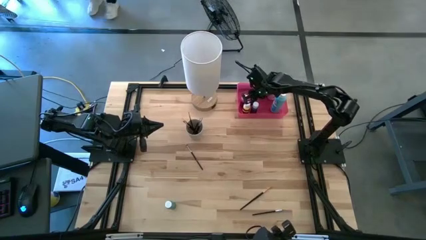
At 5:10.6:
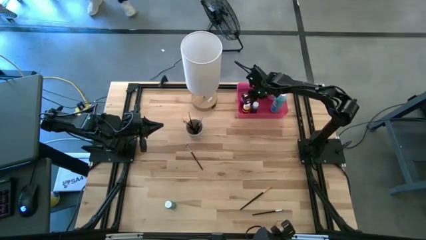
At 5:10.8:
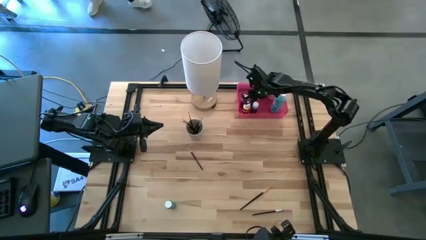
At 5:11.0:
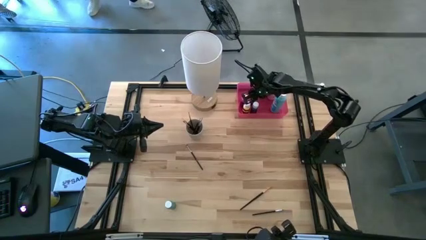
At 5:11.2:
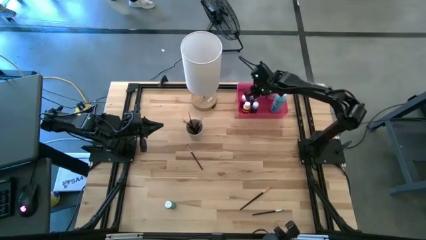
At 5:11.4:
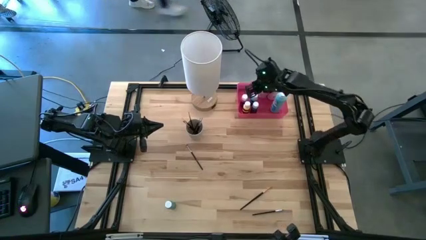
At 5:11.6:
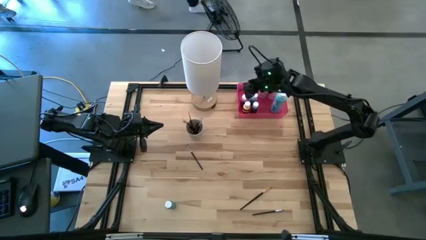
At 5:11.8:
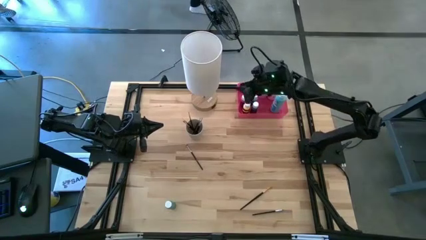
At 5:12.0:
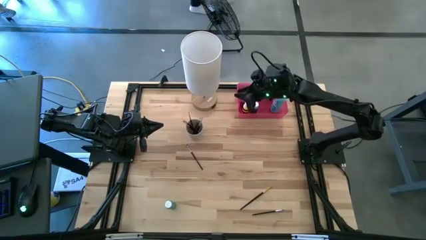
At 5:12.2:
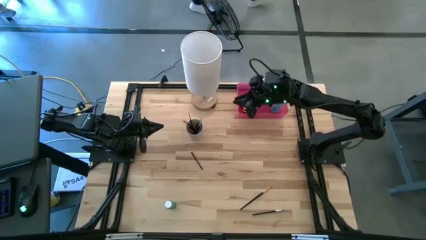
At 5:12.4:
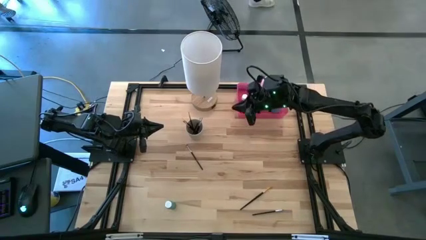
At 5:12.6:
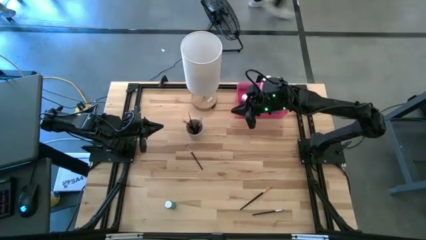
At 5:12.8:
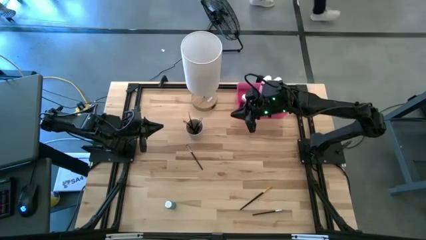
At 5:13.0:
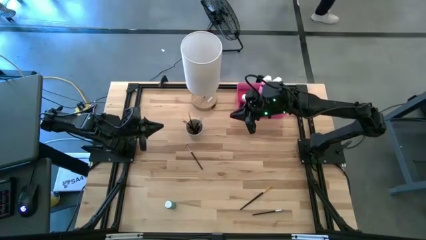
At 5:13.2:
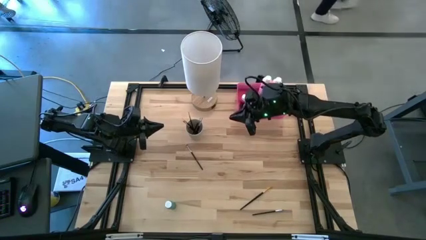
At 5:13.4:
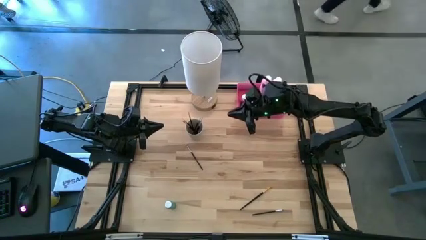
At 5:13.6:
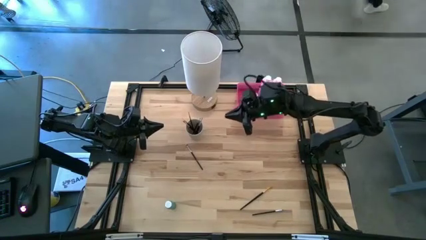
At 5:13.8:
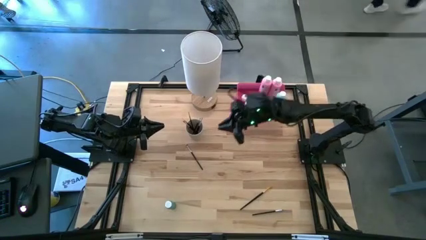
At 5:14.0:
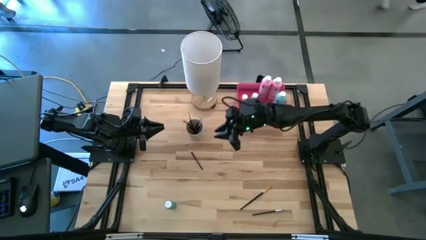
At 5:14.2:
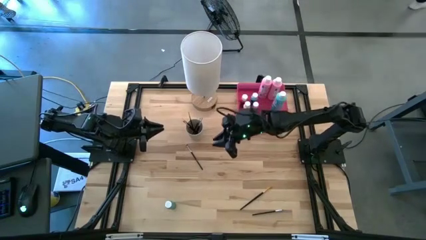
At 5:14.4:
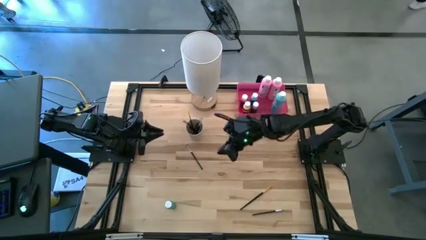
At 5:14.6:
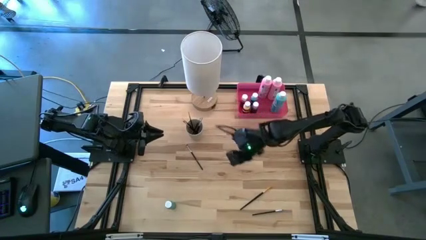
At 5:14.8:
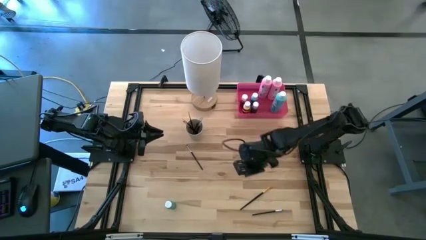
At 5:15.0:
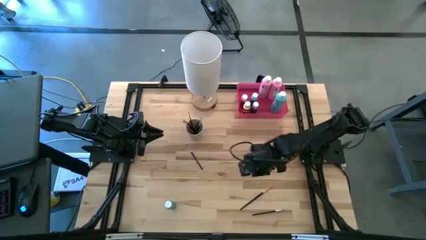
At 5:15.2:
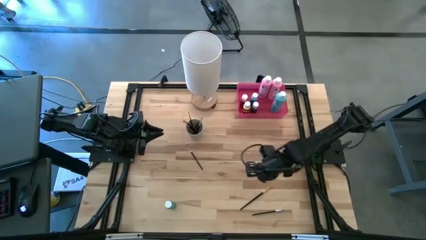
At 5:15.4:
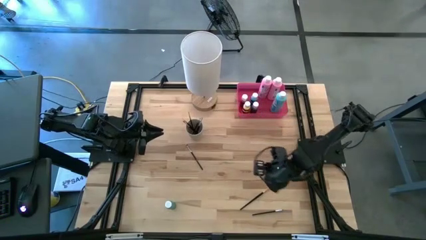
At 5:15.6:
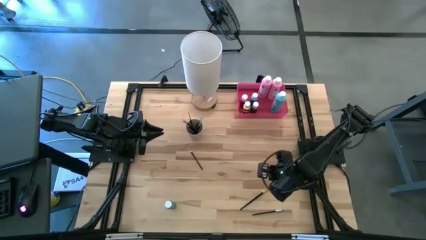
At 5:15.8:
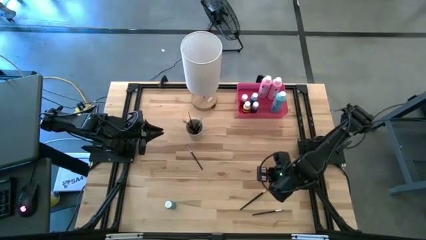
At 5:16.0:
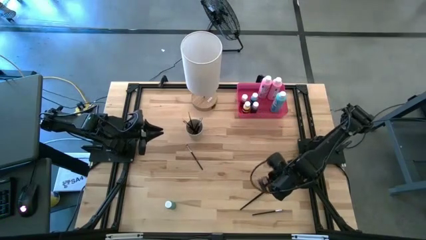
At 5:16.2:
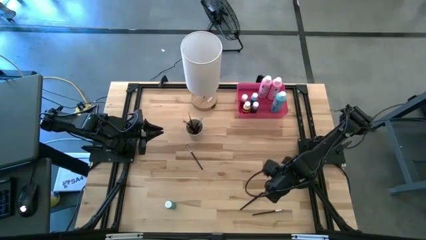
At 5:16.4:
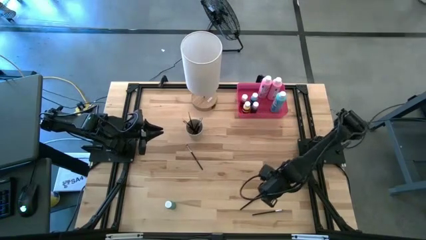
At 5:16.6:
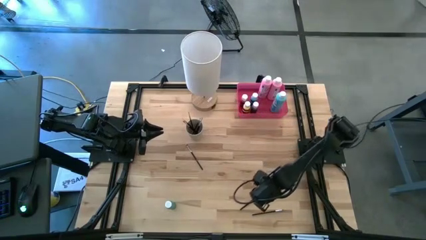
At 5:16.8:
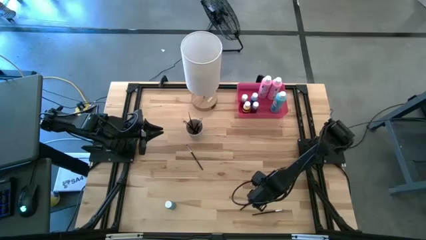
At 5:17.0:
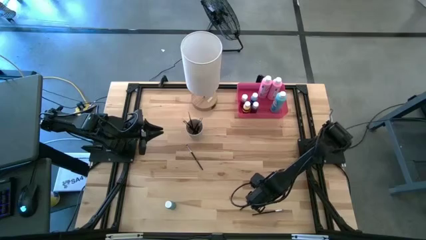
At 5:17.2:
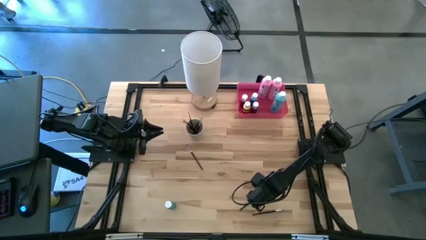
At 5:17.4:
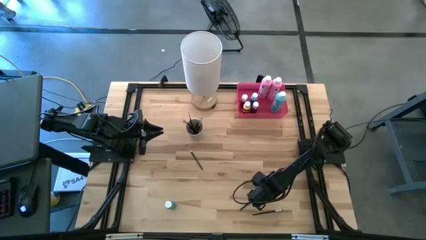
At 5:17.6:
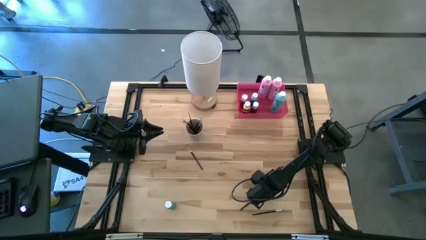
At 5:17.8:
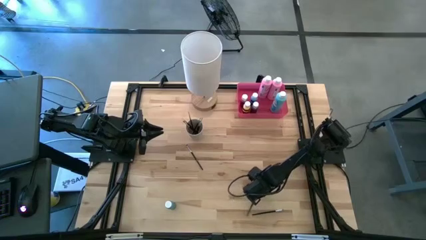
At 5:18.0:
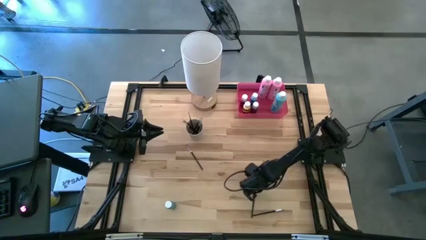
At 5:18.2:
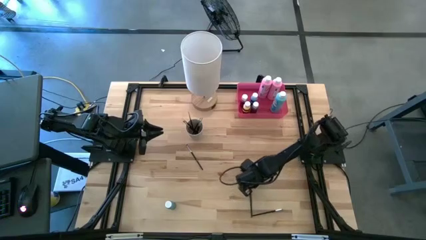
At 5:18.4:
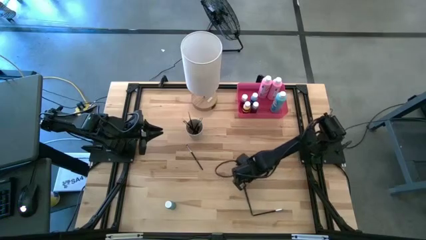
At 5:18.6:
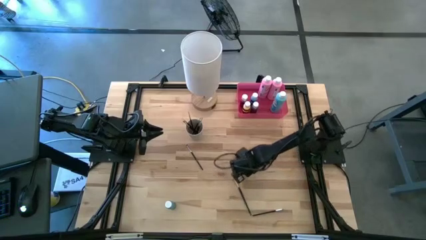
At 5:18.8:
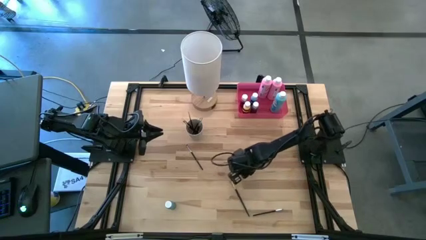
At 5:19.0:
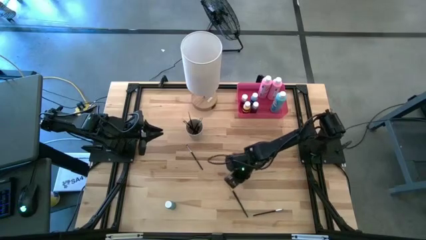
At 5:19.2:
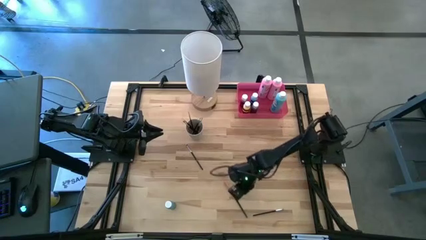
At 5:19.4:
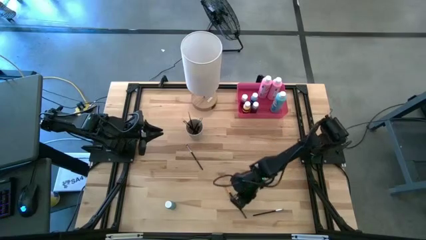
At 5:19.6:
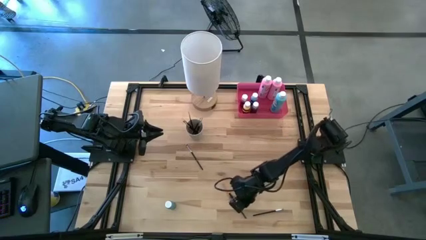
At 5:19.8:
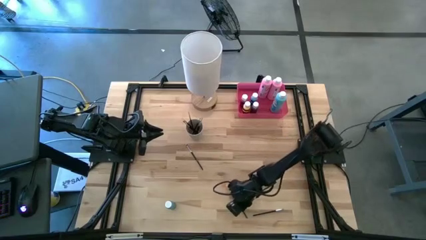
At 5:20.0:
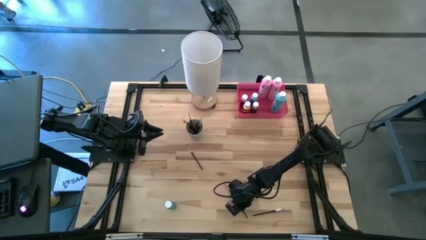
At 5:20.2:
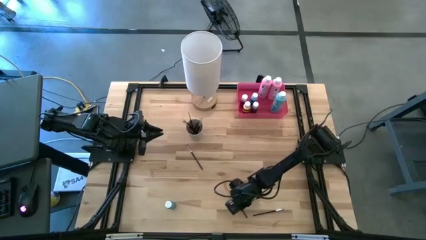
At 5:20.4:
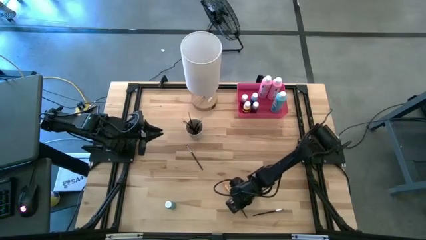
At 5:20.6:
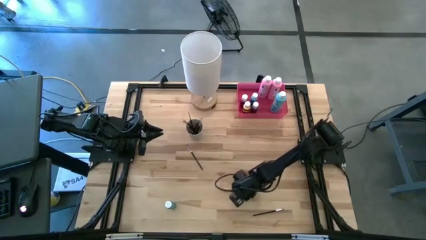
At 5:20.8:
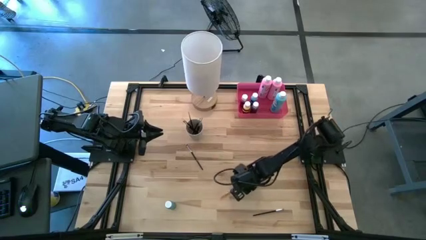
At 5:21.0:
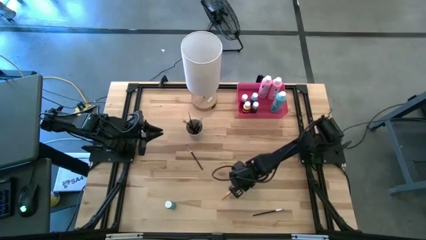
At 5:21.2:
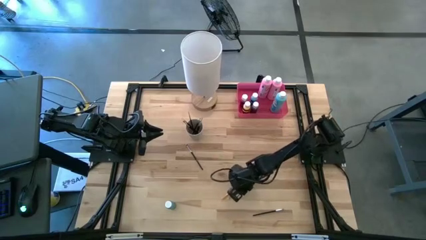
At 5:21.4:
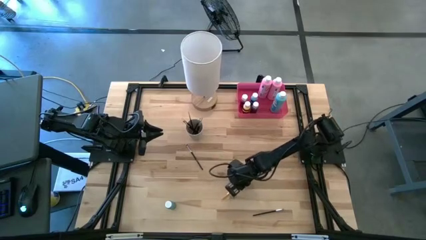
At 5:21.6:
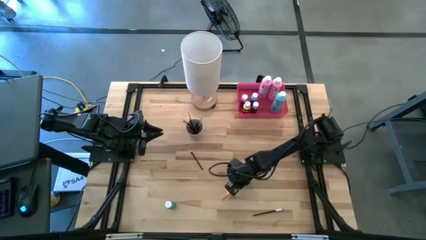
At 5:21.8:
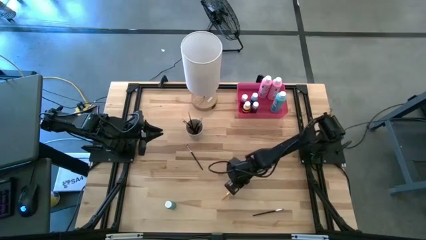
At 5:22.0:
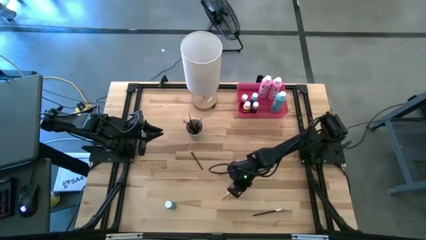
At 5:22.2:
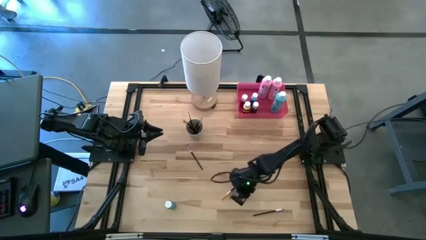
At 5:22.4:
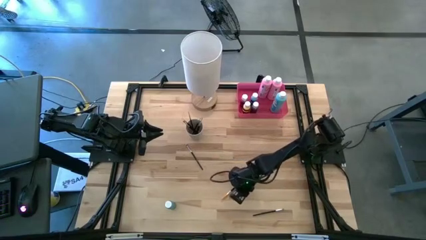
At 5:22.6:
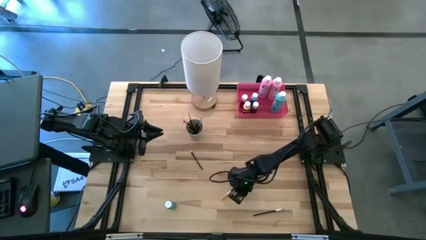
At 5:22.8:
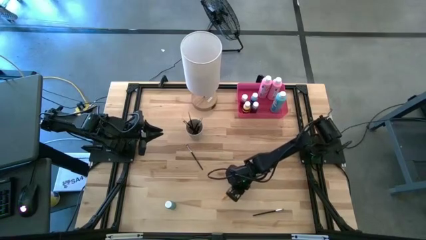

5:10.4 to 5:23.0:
Task: Pick & Place Paint Supplies
Put the golden paint brush into the white cup
